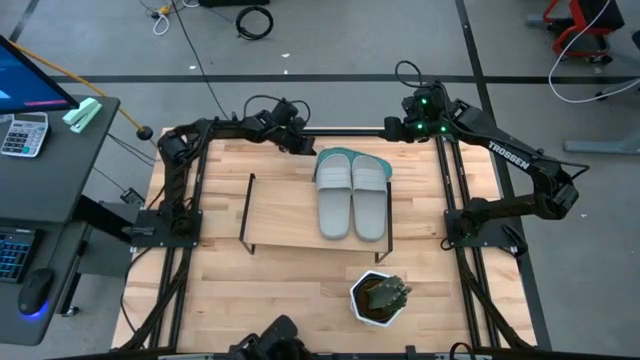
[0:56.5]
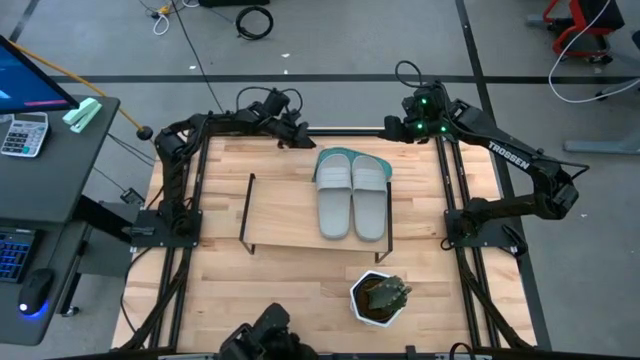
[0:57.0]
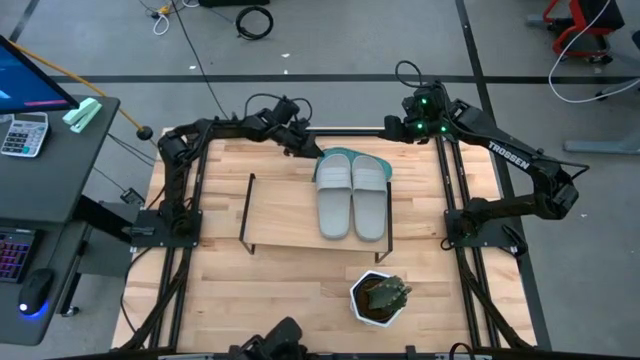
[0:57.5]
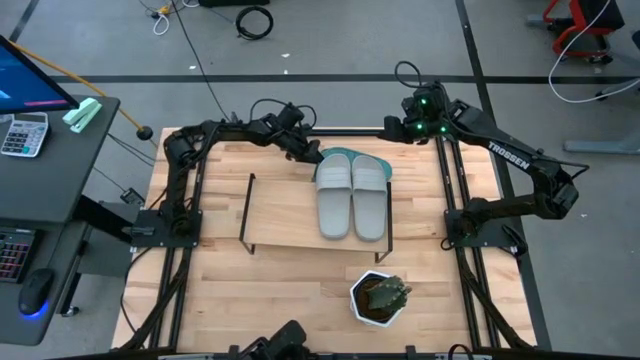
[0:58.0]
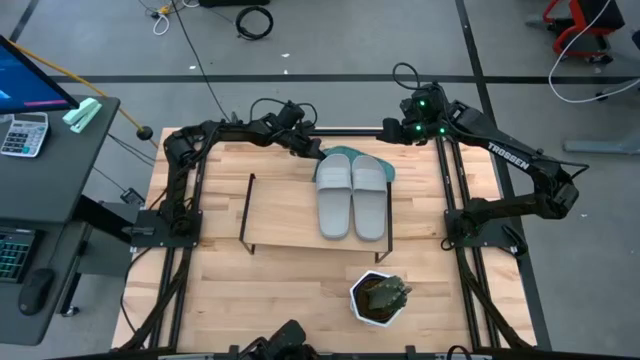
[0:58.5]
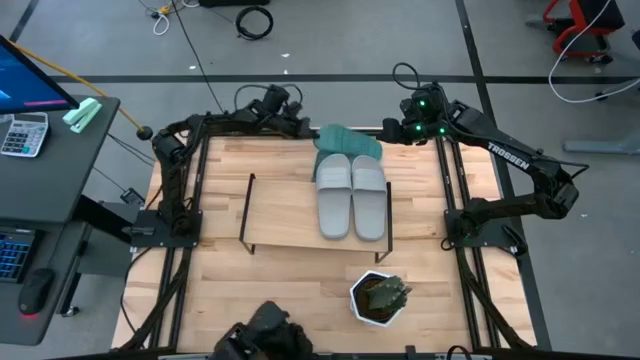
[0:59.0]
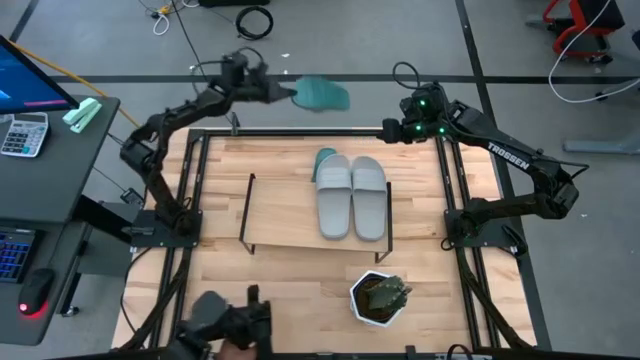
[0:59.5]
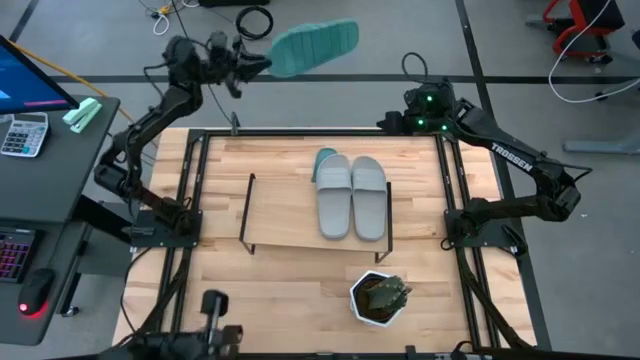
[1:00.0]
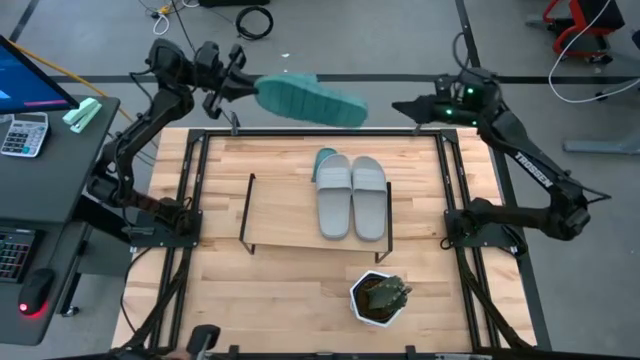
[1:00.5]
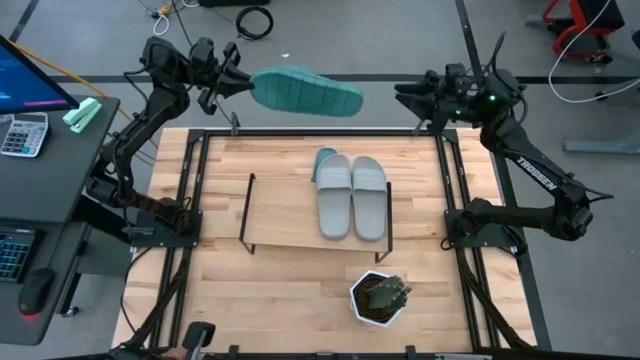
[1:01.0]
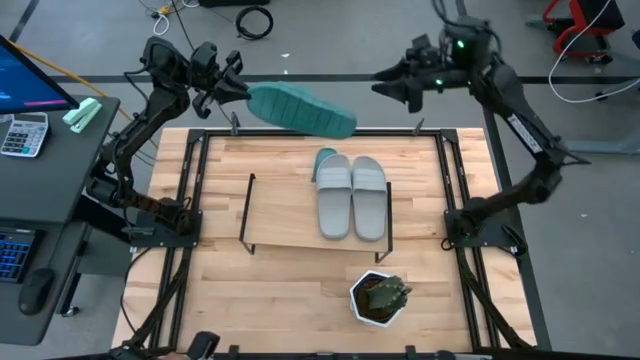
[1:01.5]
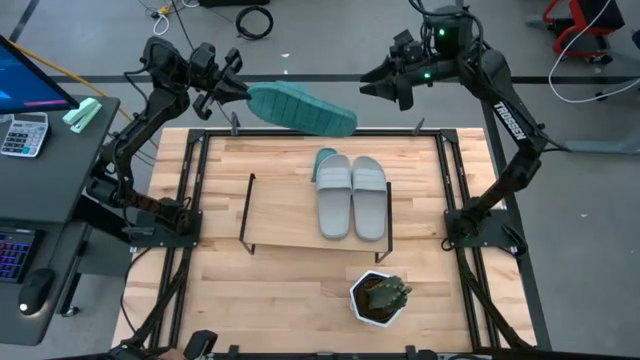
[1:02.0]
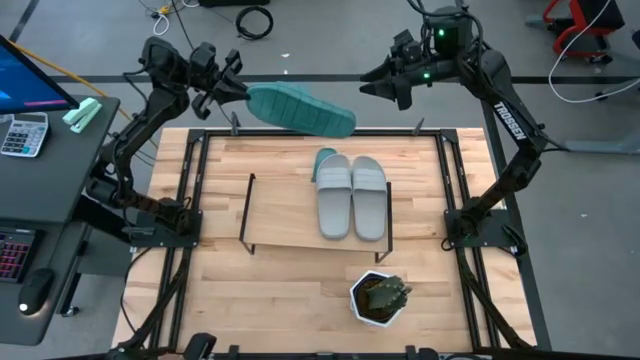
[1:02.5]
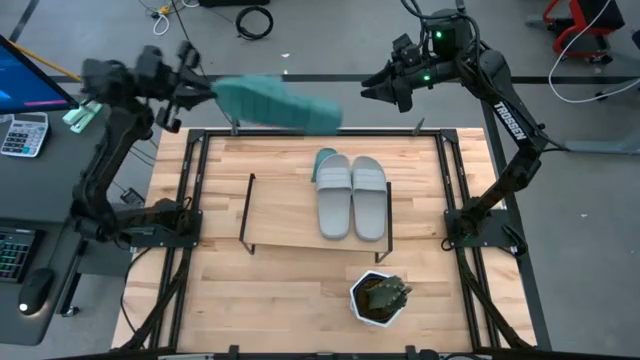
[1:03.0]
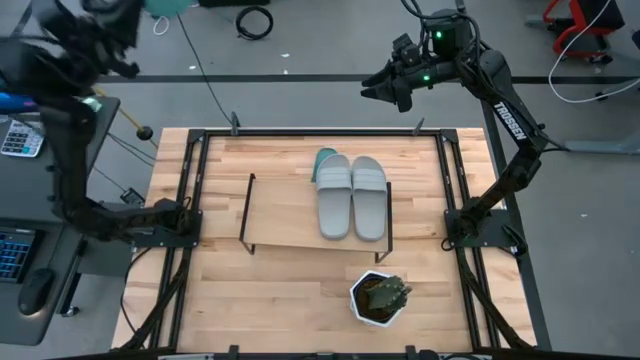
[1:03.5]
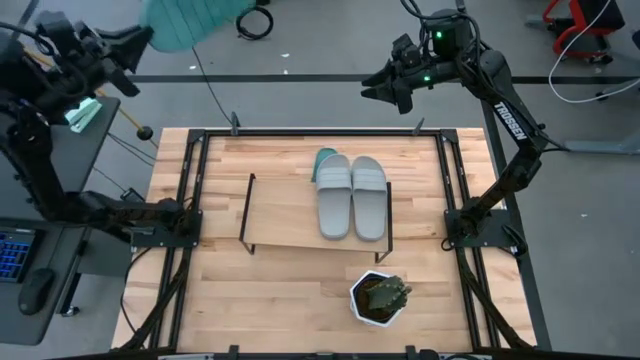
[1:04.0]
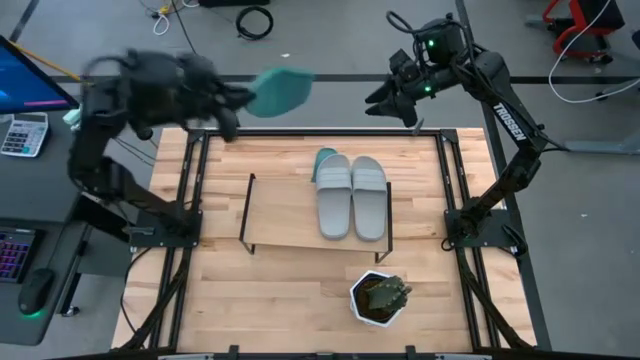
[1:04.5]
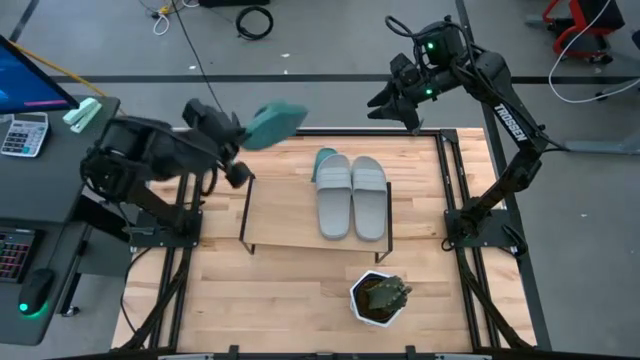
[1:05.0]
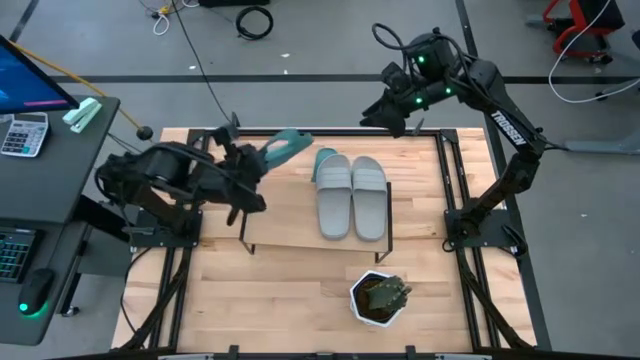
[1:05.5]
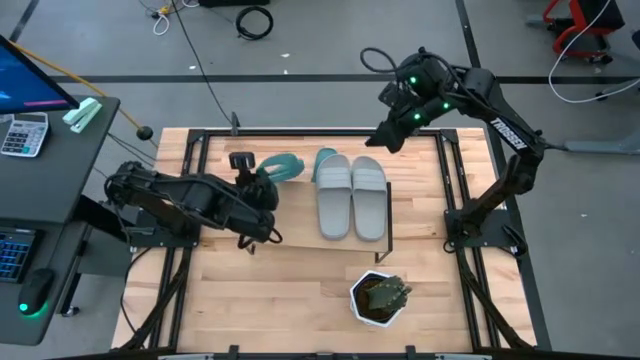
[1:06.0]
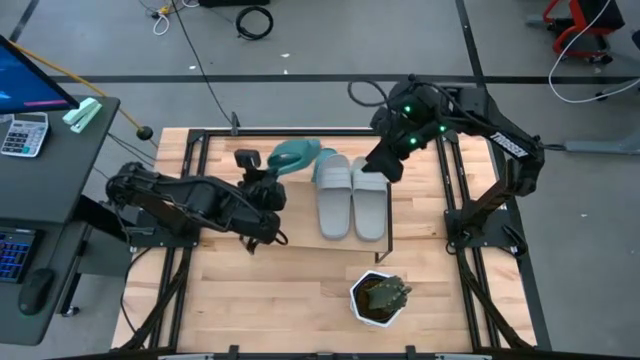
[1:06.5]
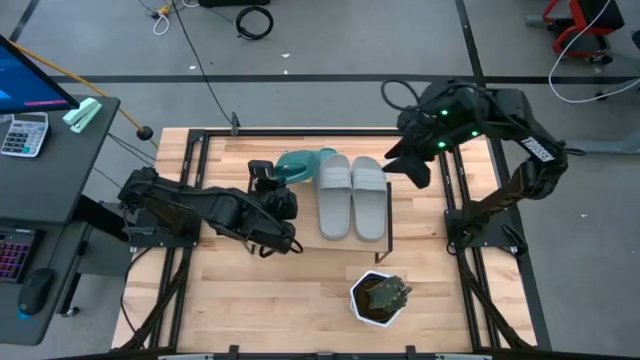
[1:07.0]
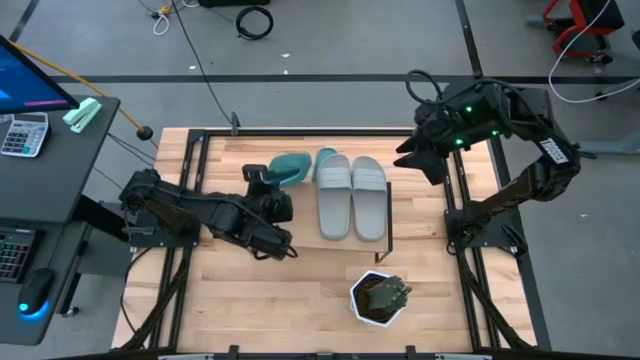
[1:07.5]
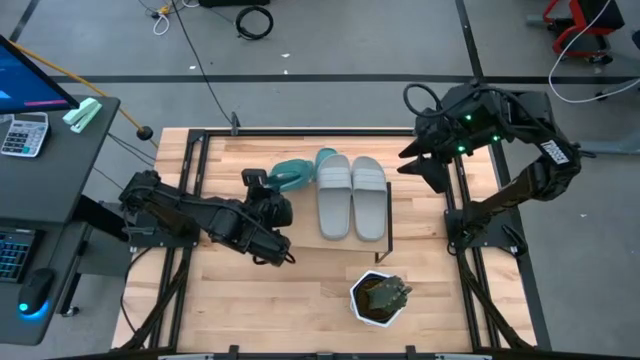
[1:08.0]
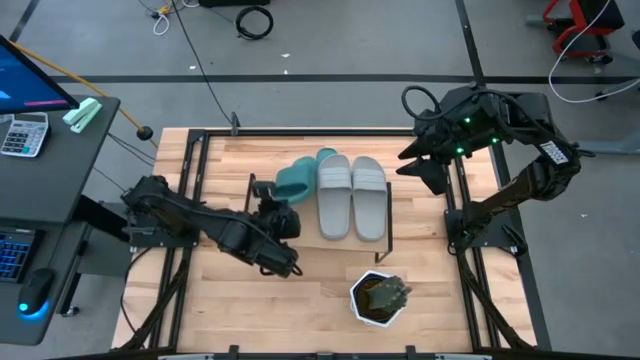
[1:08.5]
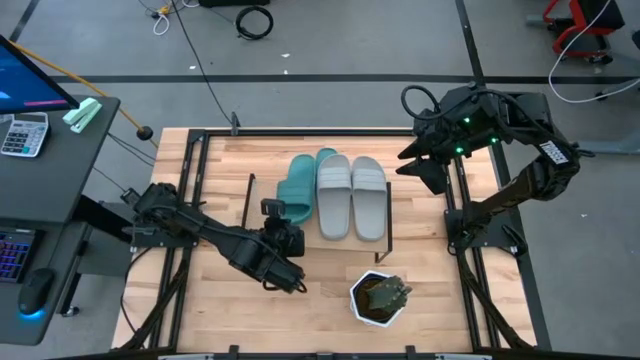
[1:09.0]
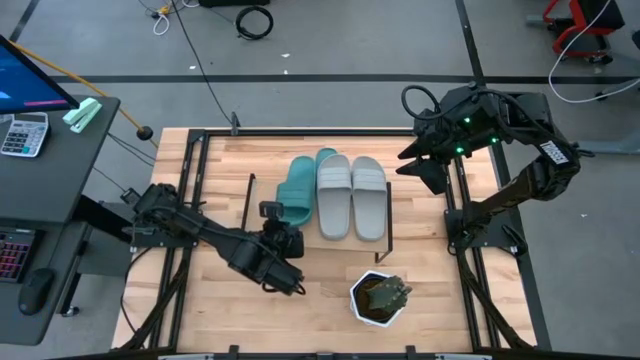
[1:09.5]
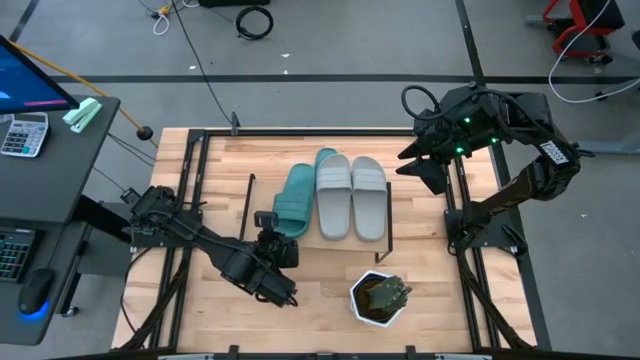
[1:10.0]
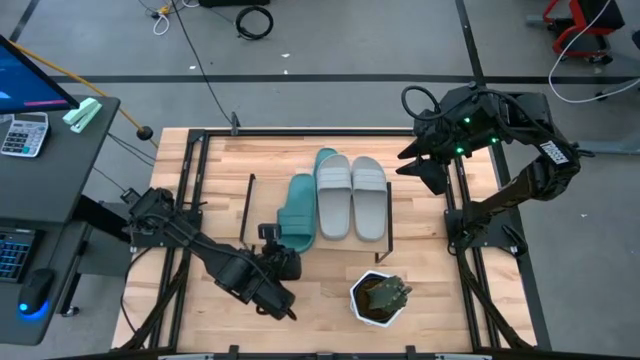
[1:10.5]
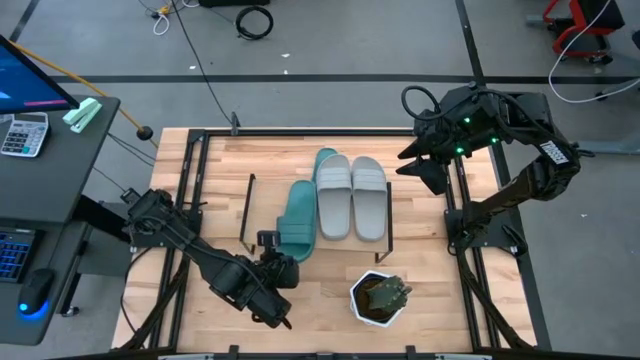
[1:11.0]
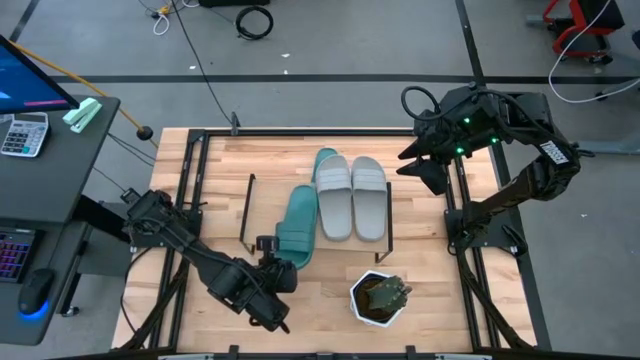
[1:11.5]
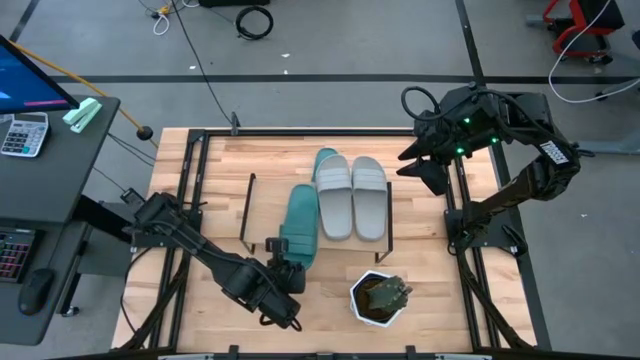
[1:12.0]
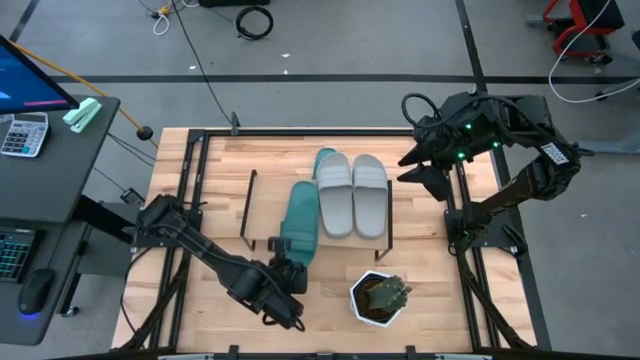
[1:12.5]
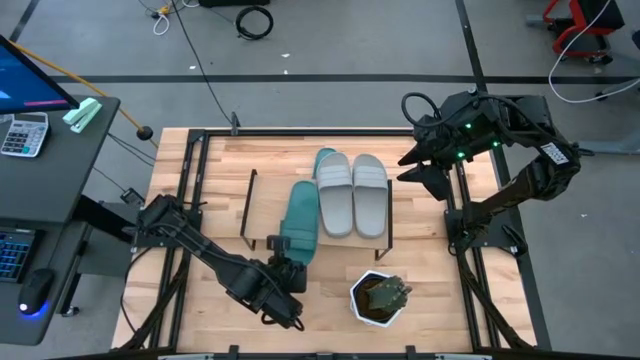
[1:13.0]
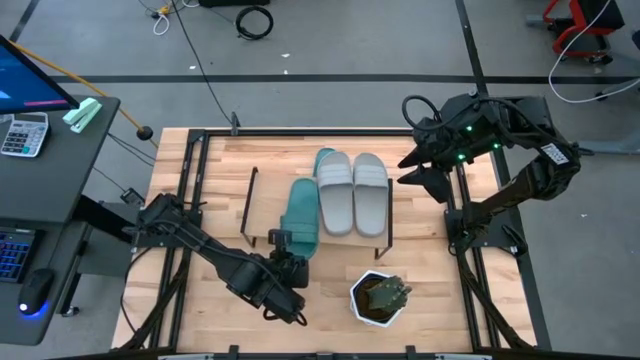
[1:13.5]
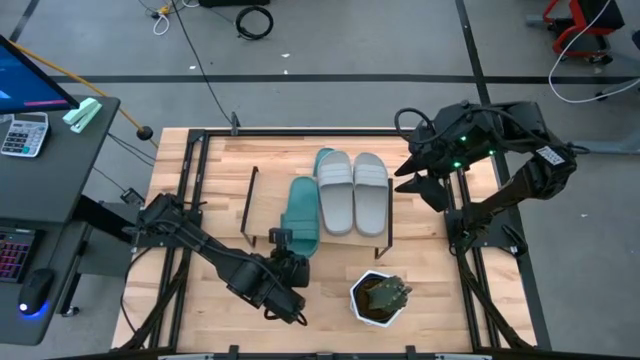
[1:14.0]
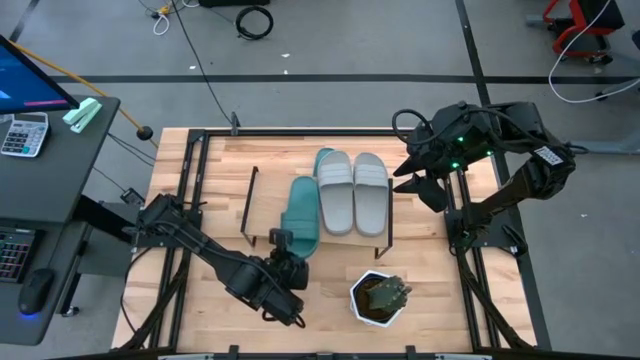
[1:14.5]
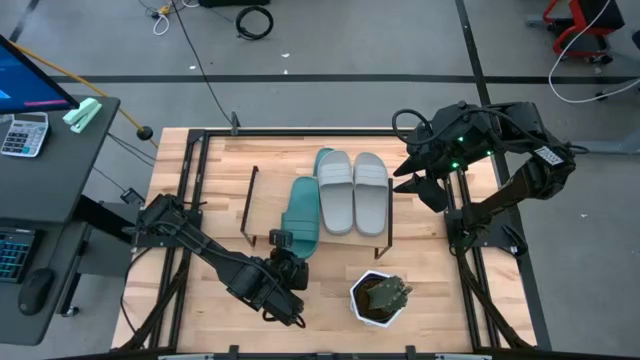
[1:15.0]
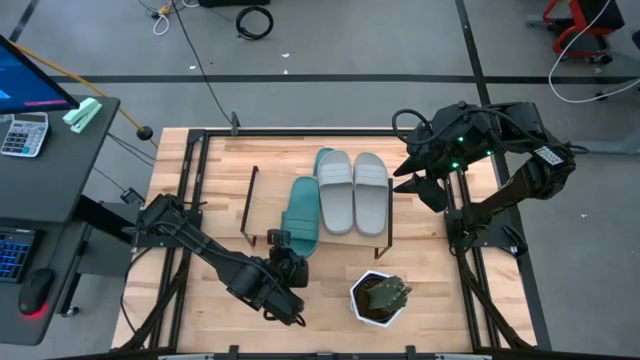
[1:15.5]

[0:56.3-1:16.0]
Task: Pick and place slides into the shelf
Put the right green slipper on the shelf

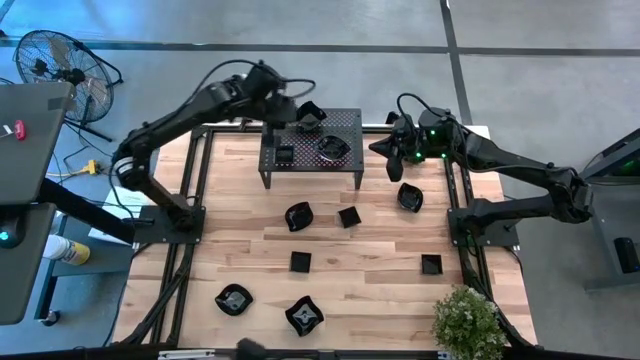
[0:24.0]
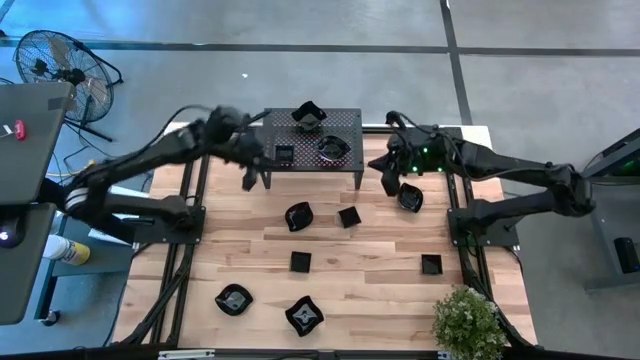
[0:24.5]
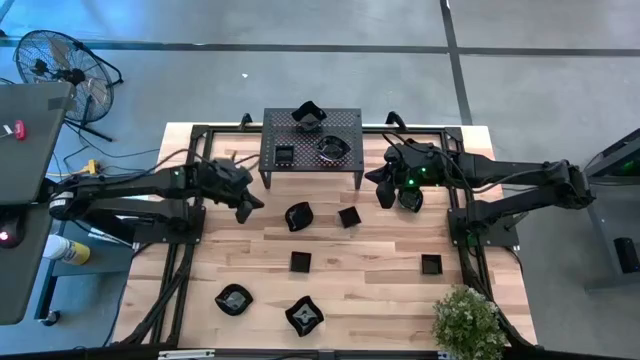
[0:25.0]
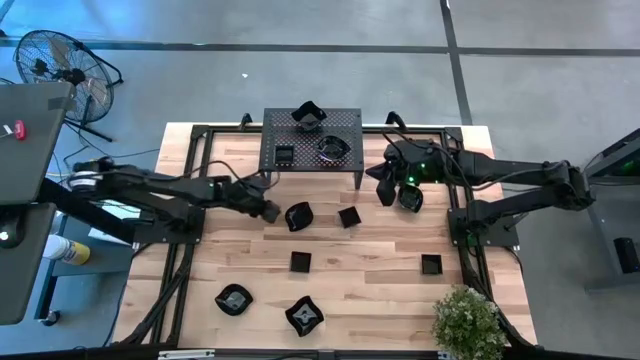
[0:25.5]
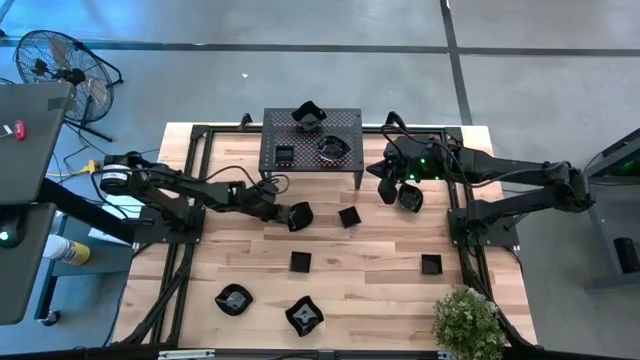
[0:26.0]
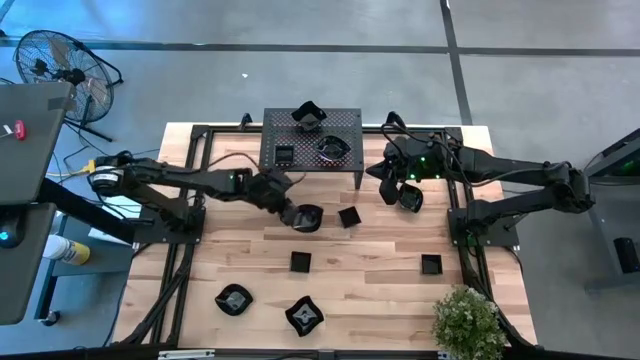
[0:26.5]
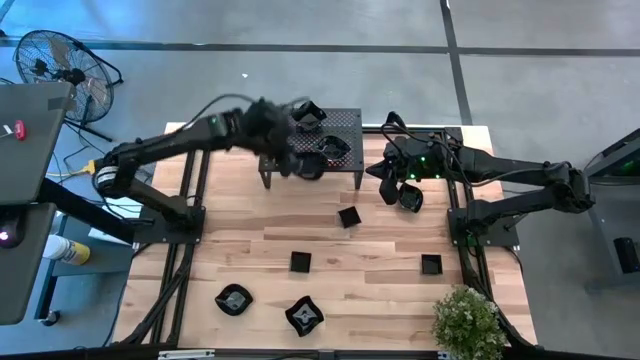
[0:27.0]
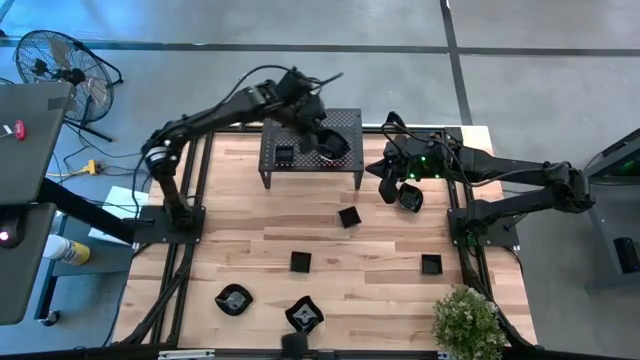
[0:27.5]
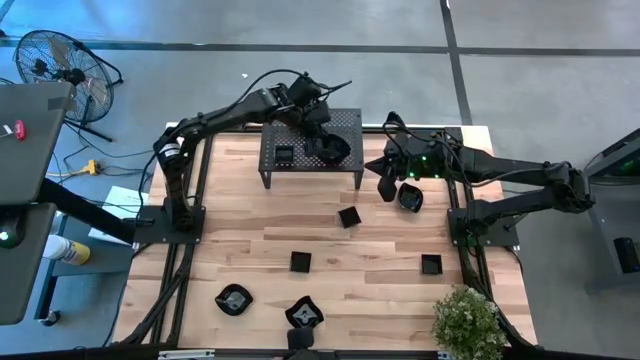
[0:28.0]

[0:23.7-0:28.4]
Task: Pick & Place Mini shaped plates
Stack the black leaf shaped plate on top of the black leaf shaped plate on the shelf
